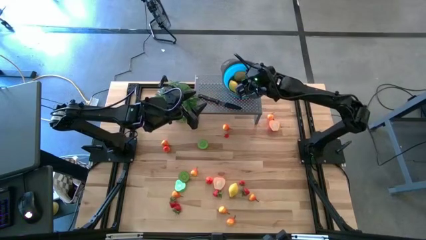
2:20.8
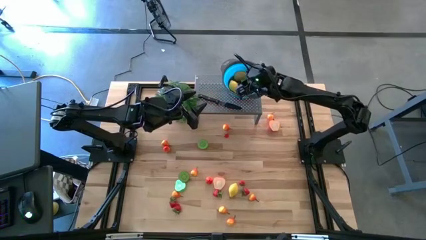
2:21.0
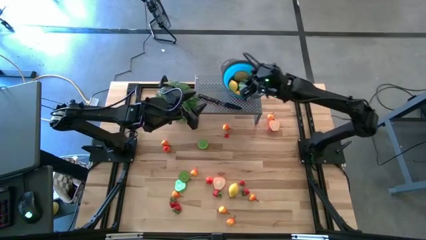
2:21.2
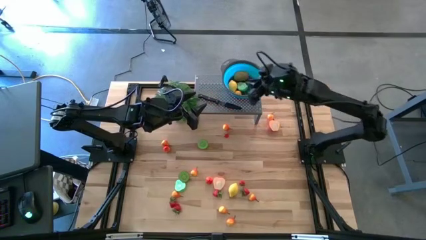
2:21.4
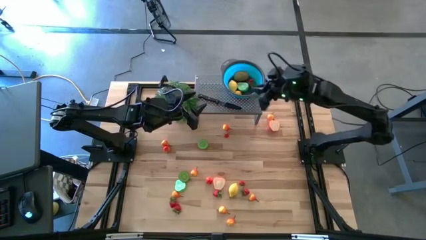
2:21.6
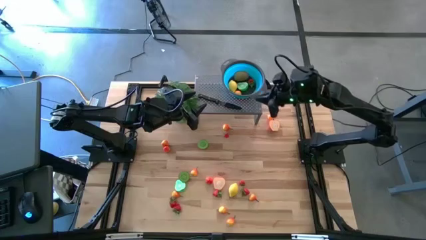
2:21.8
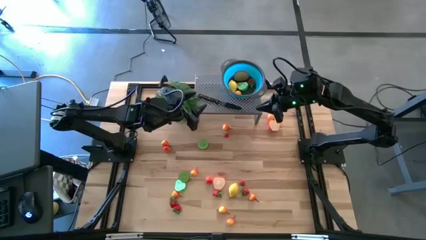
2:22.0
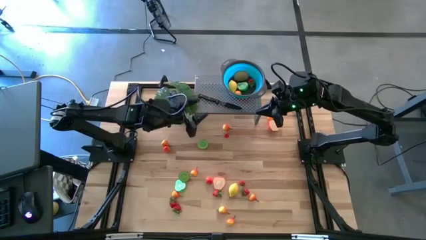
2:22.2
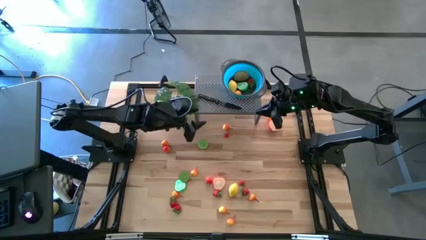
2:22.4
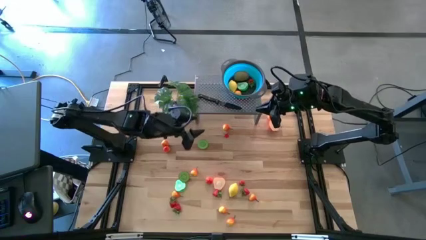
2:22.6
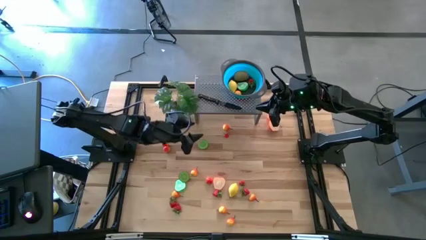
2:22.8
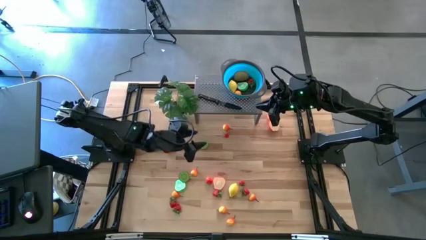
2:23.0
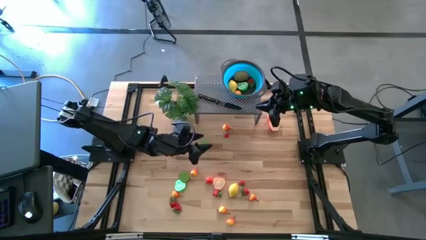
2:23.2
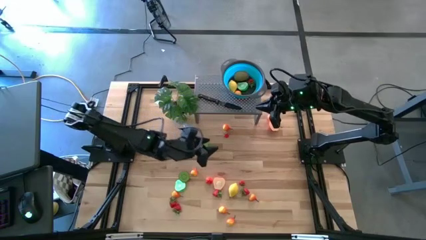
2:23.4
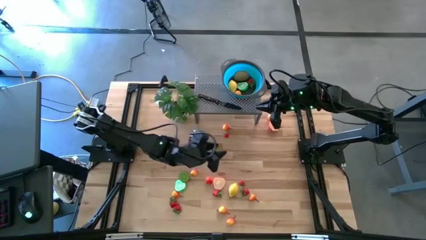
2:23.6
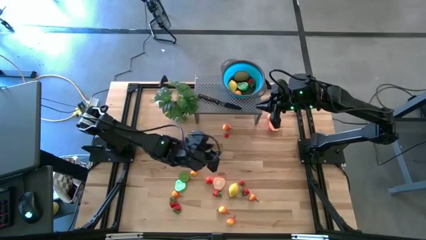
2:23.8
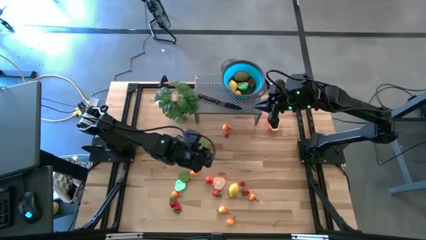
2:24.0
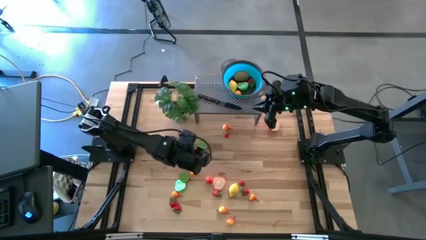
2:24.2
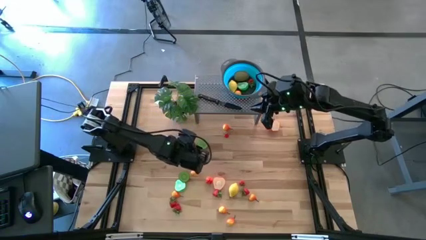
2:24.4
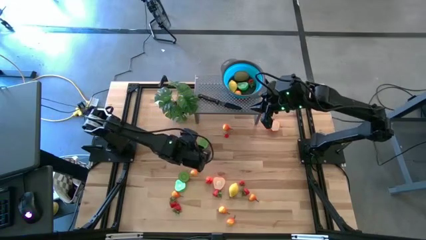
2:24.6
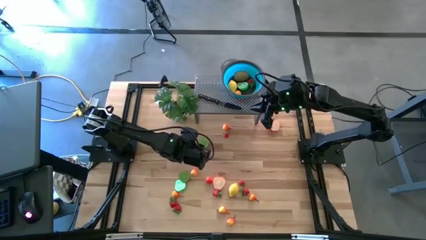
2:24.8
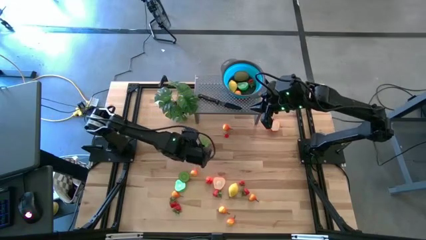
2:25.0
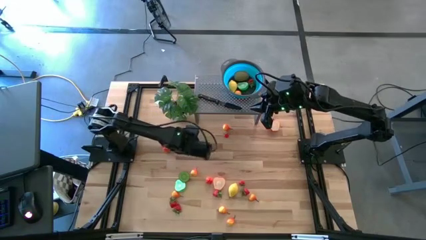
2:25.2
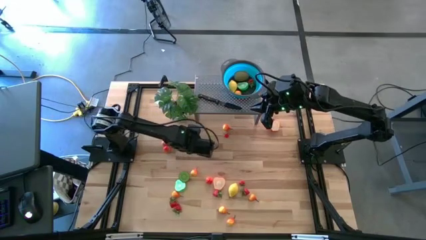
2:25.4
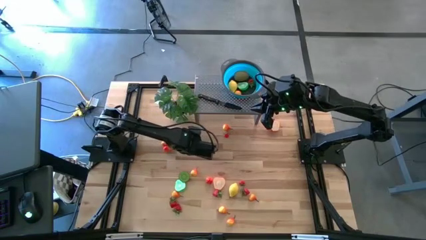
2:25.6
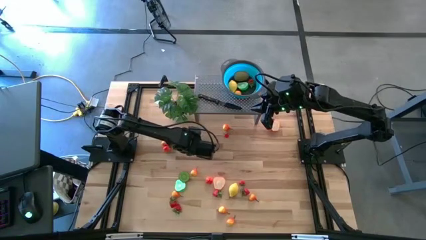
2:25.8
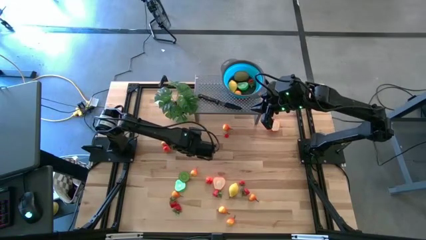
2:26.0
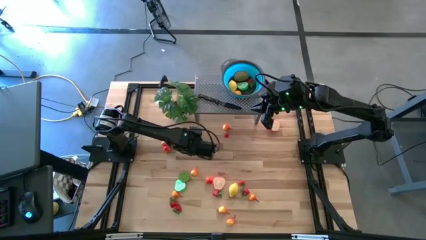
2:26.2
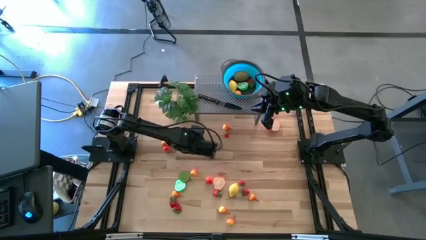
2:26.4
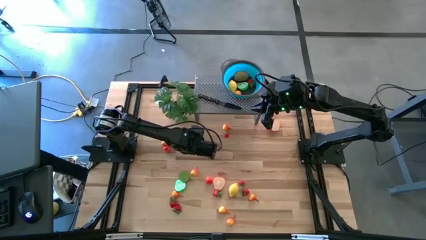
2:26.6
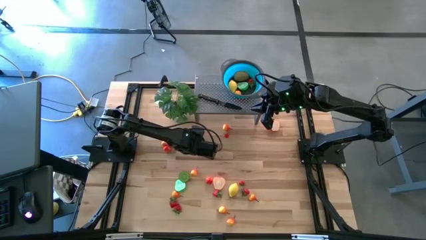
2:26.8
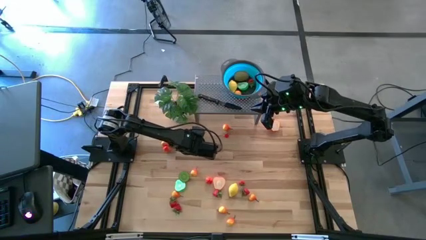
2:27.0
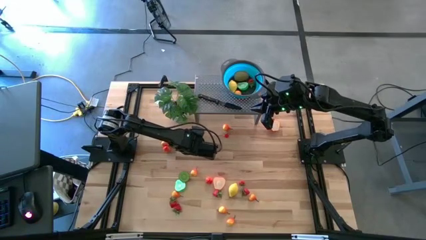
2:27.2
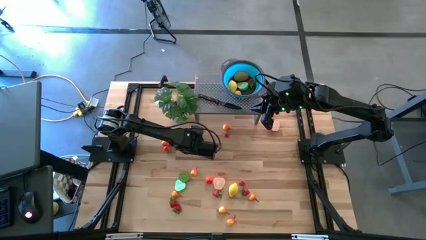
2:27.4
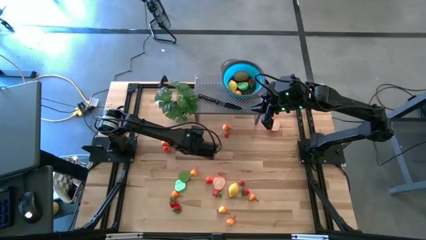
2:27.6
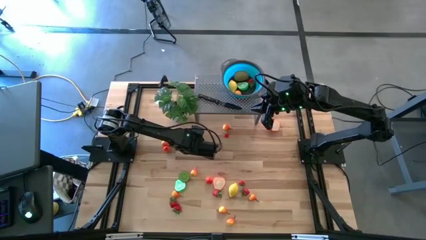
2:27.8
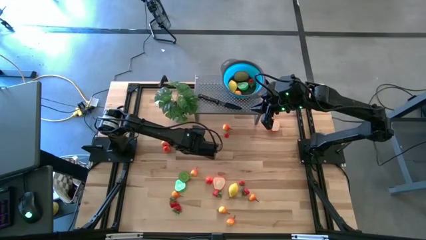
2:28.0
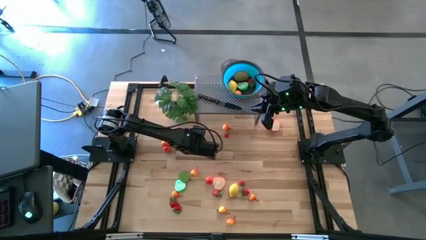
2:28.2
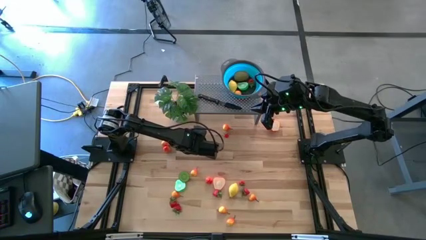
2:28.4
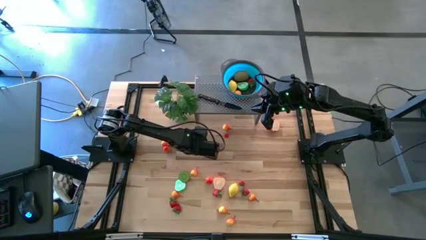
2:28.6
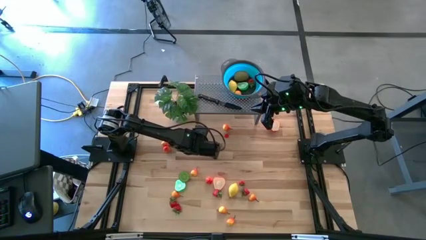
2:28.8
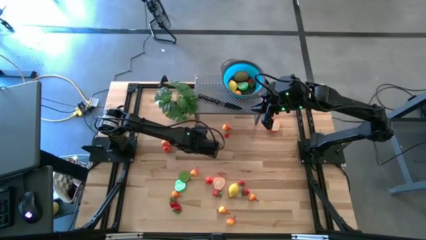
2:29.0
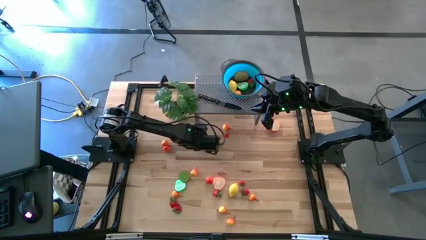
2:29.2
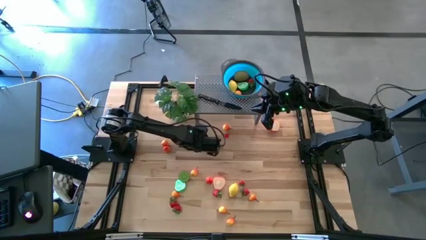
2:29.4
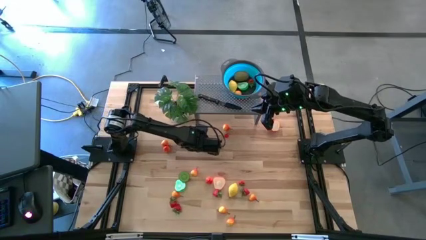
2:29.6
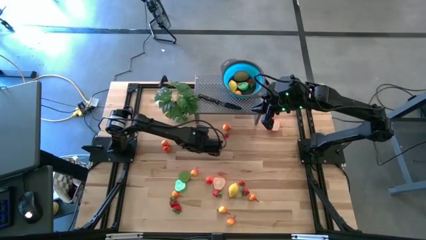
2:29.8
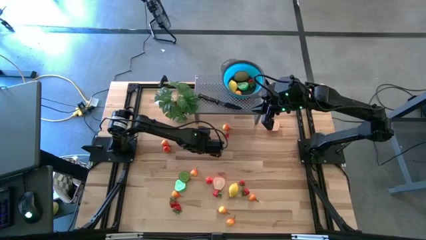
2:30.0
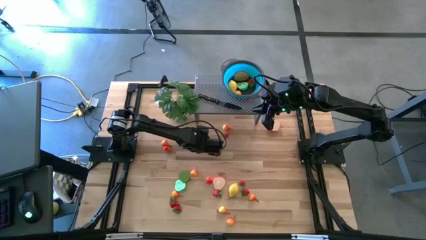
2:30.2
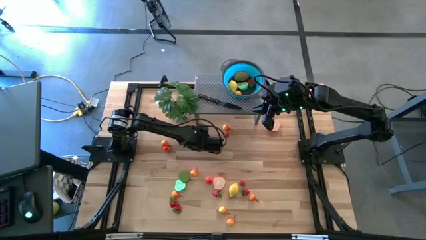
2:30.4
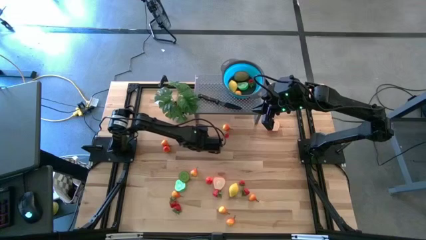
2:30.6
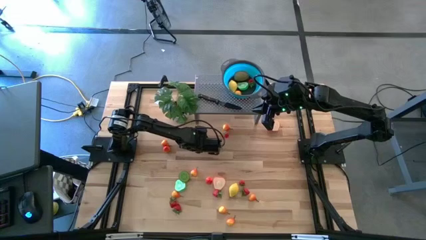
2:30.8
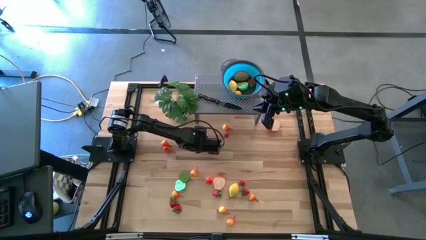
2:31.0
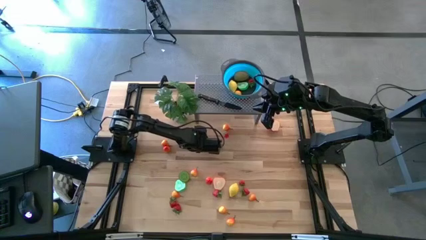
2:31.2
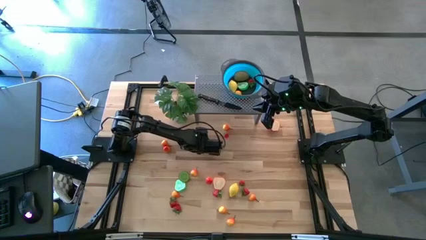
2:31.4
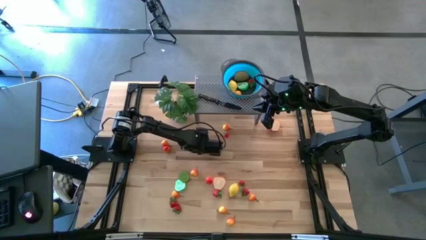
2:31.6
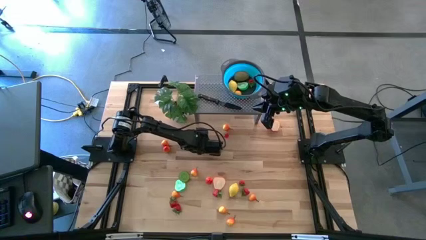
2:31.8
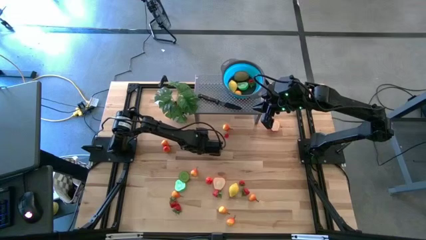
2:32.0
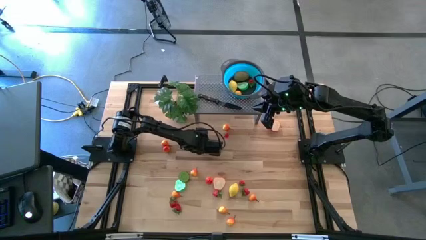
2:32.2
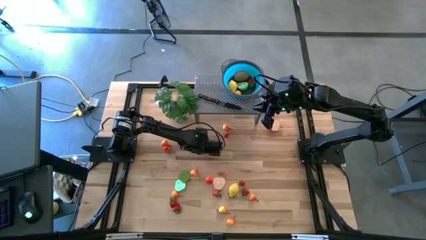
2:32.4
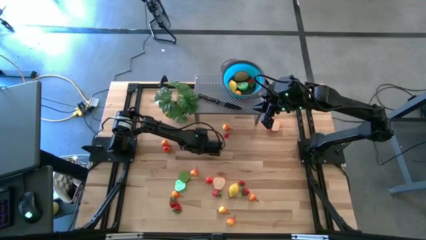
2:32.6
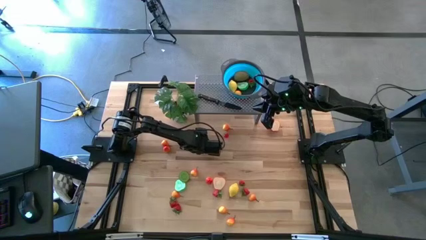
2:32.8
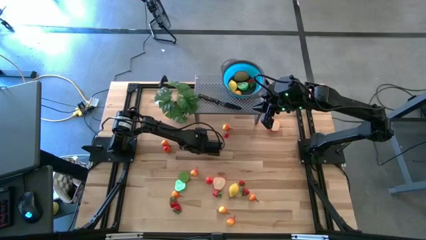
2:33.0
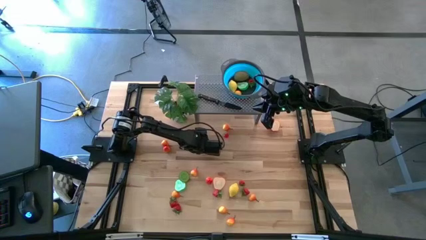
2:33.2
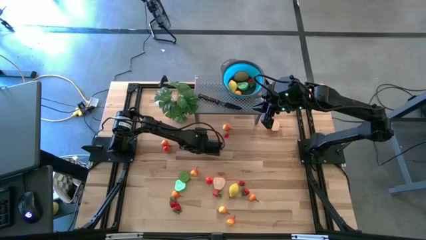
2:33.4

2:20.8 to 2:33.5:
Task: Pick & Place Fruit
Put the brown kiwi in the blue bowl on the shelf

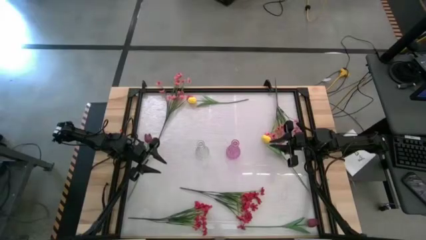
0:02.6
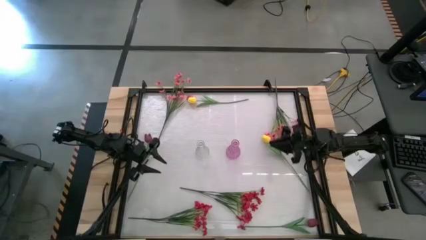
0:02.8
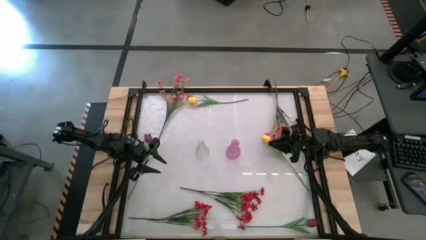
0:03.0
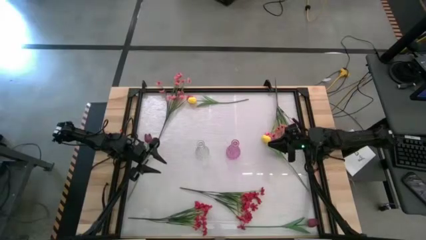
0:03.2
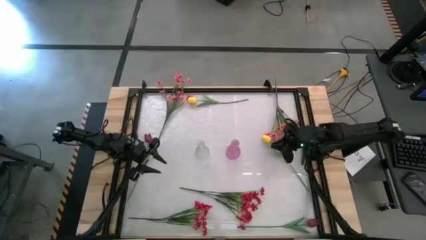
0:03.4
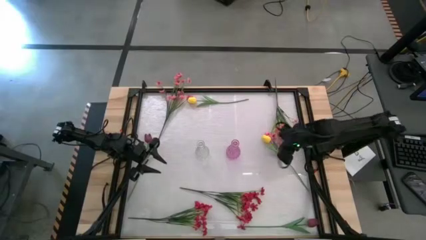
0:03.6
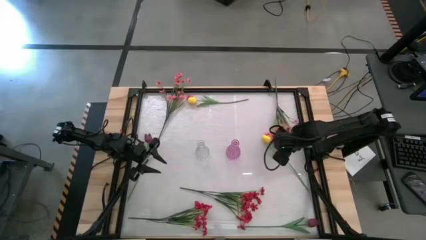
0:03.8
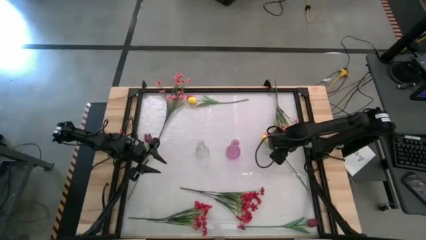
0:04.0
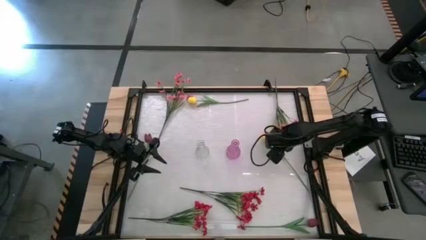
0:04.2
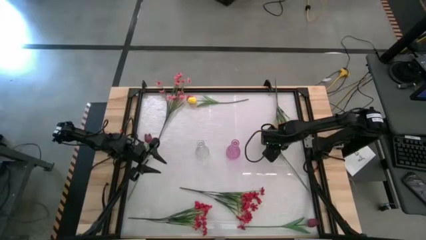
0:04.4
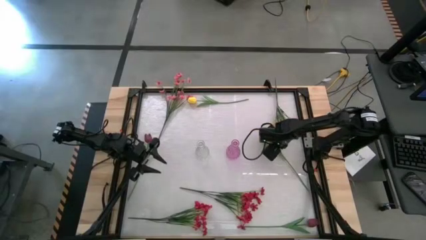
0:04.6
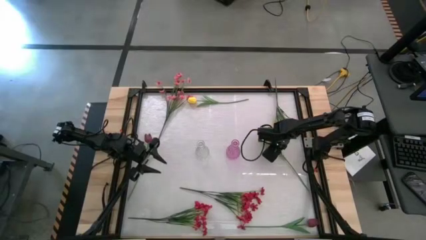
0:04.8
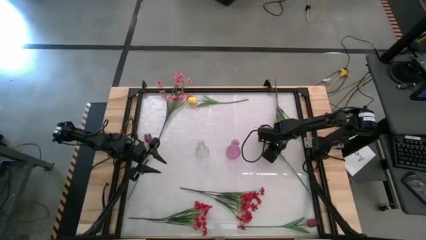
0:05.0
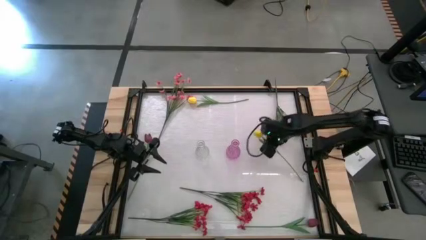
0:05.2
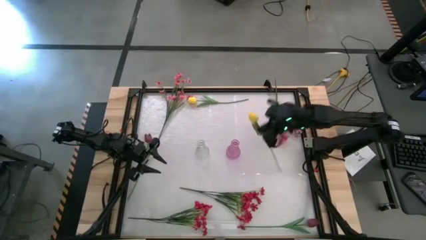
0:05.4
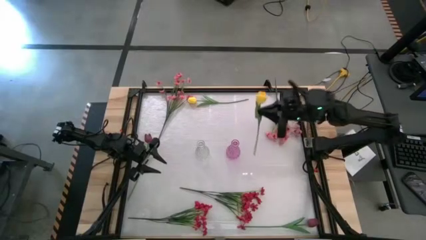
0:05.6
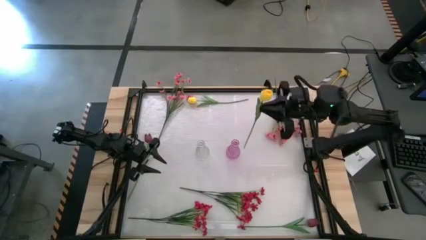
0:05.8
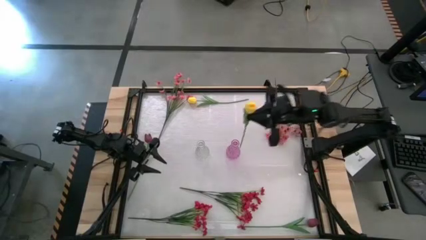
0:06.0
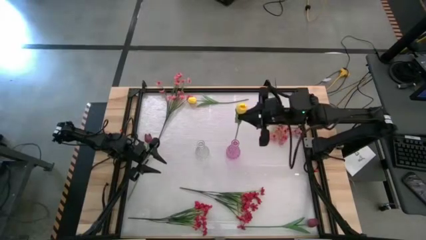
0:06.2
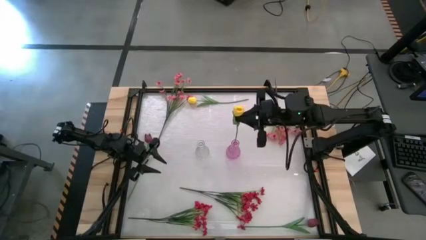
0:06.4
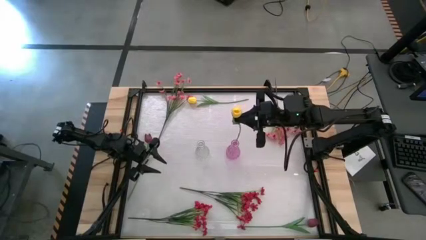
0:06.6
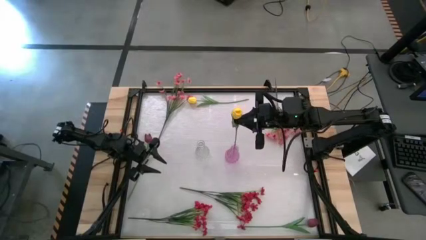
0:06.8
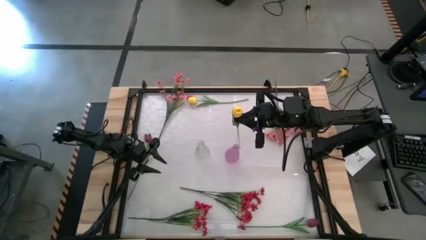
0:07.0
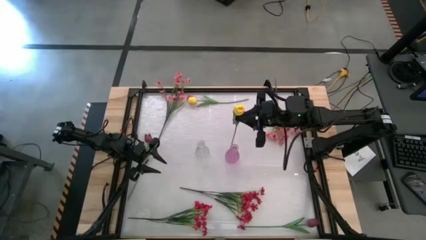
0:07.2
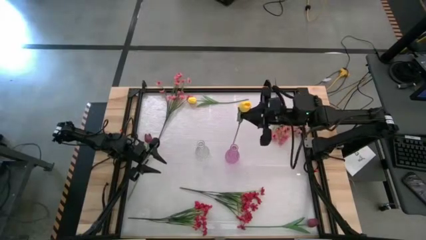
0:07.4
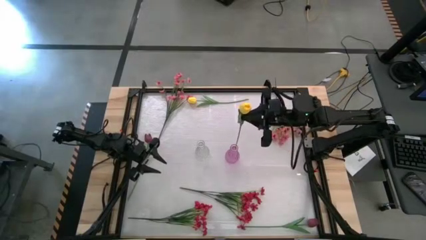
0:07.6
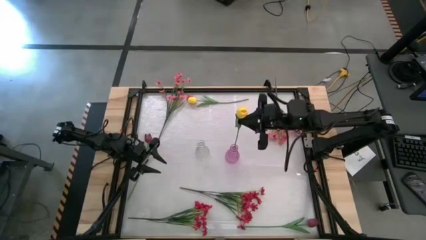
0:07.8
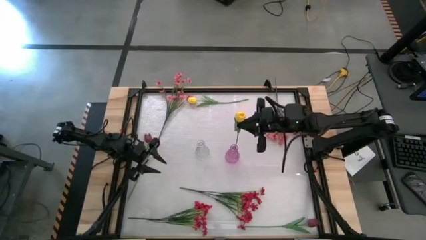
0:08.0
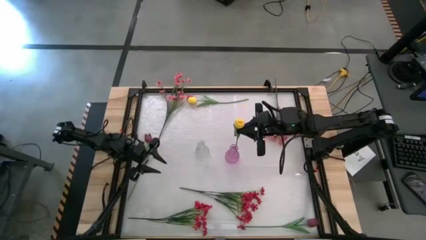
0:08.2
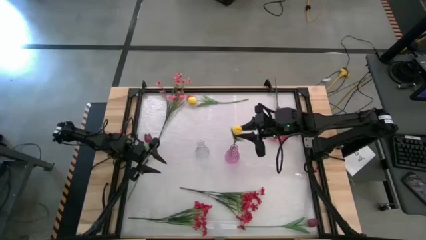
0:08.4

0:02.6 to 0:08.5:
Task: Sort flowers into vase by color
Put the bottom yellow flower into the purple vase
